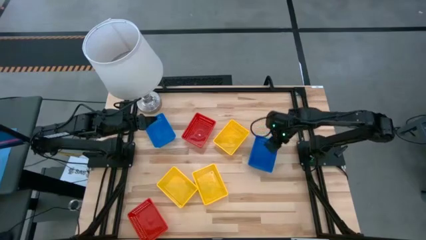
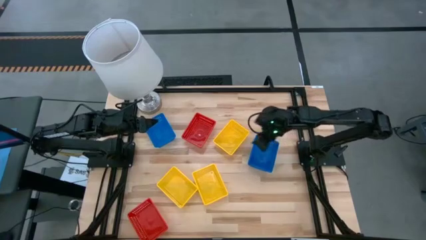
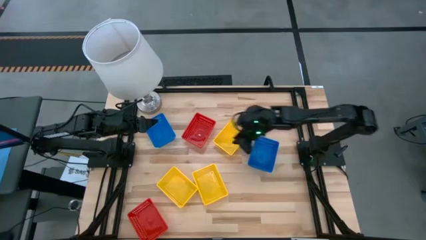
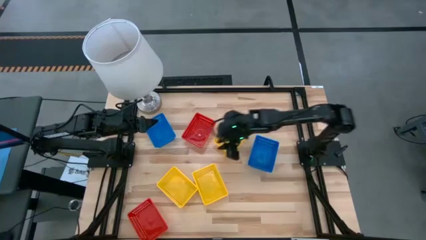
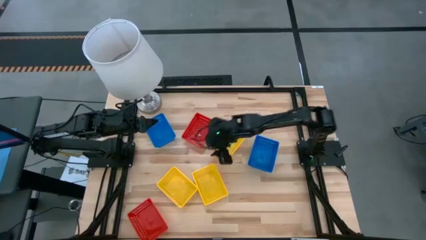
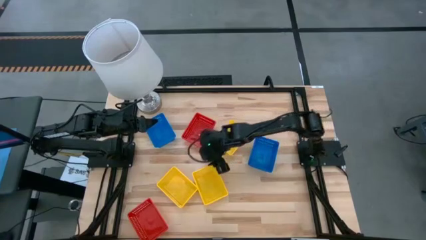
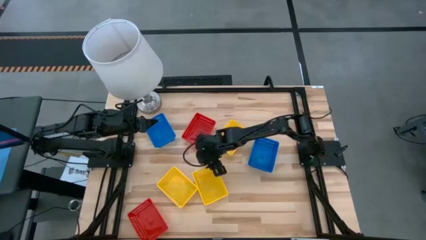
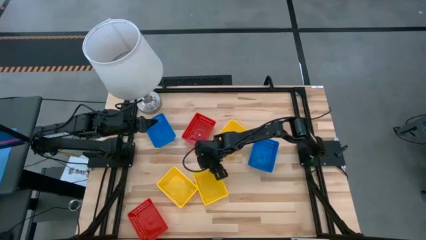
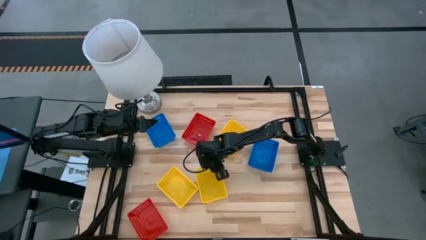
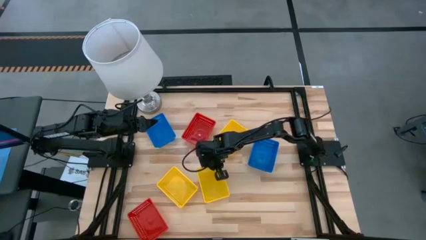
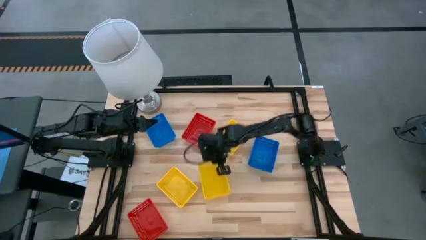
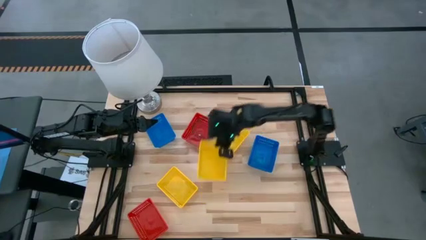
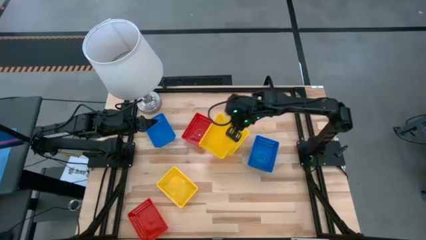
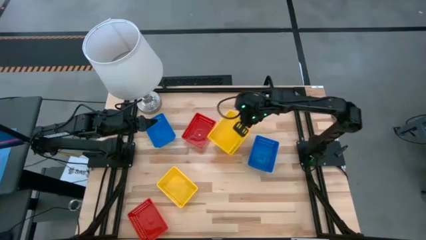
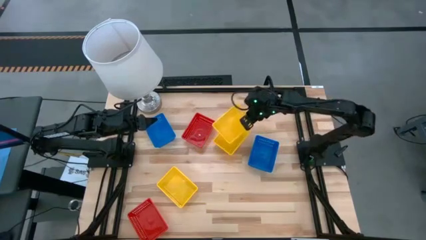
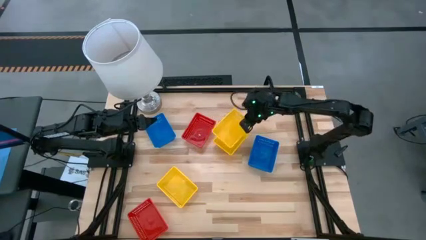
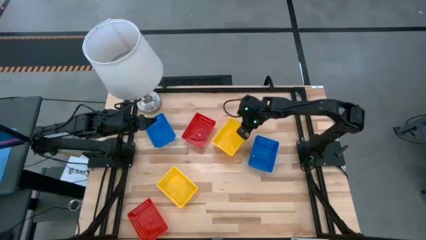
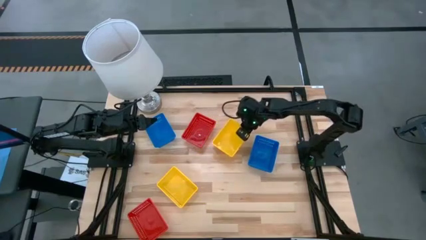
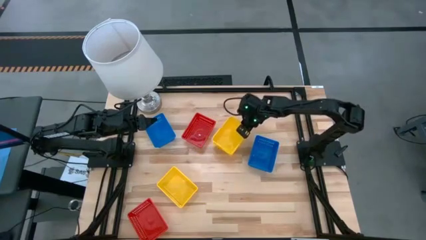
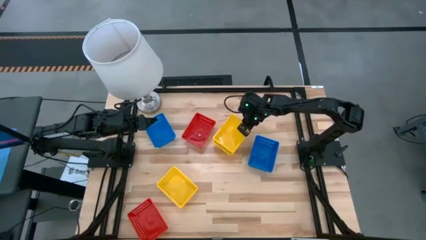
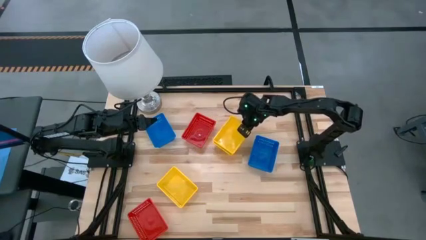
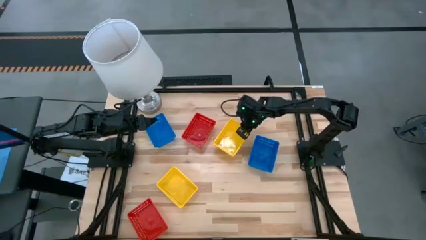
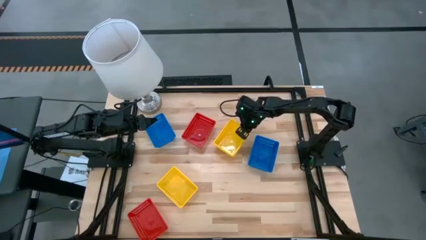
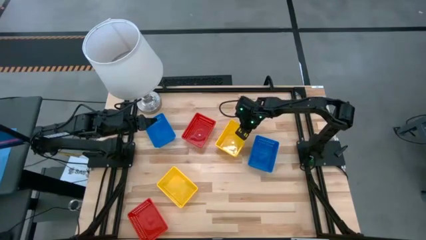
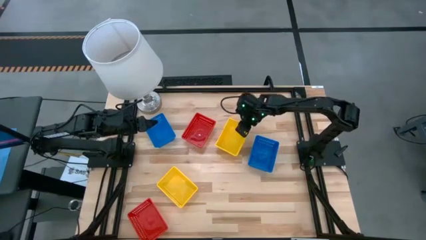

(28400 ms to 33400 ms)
Stack the bottom right yellow bin on the top yellow bin

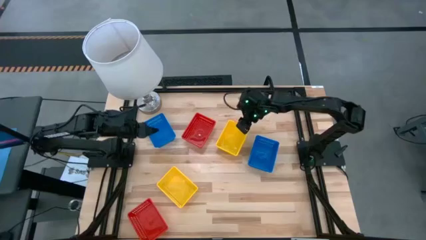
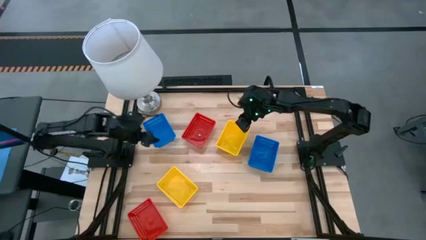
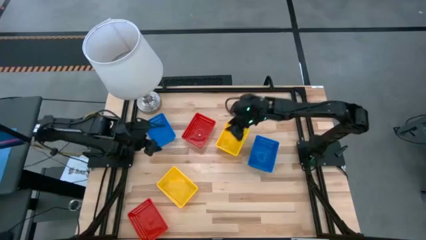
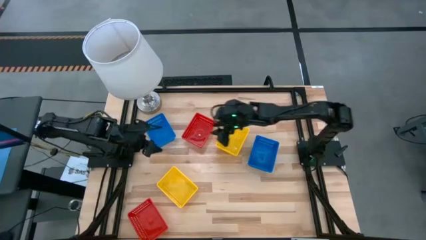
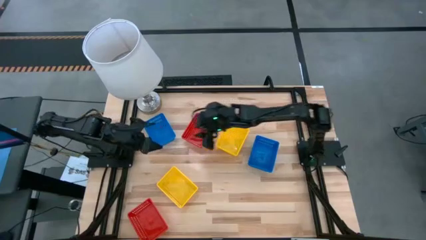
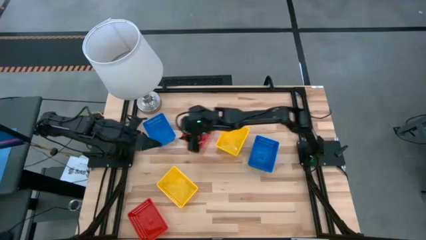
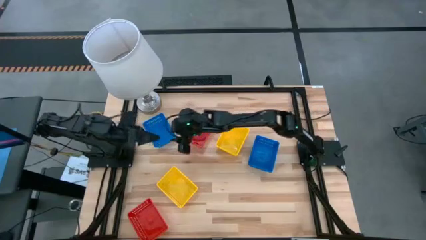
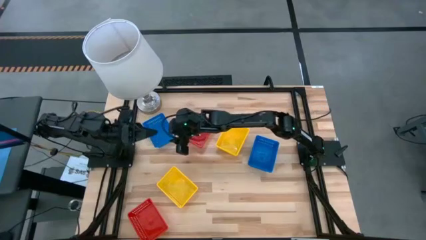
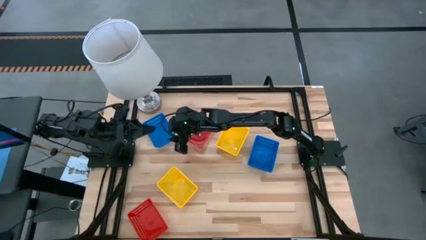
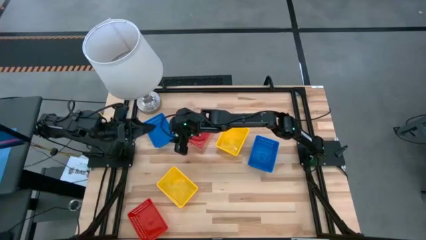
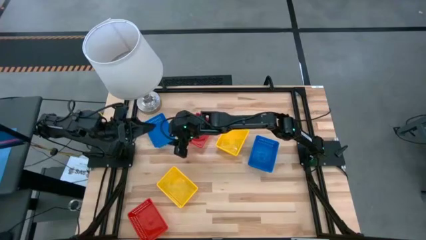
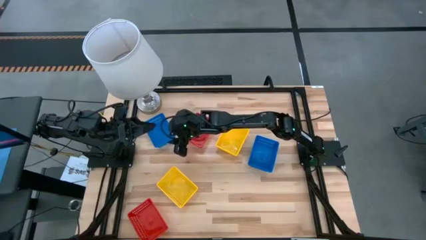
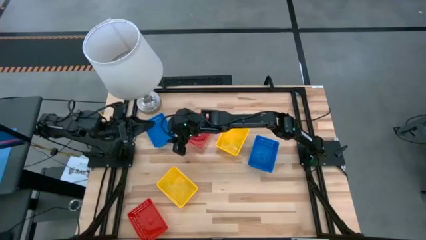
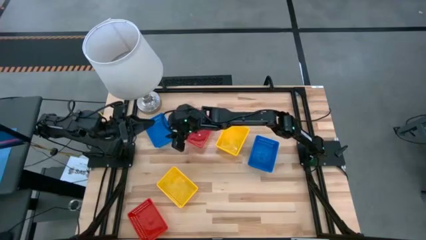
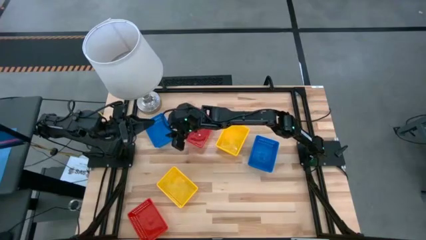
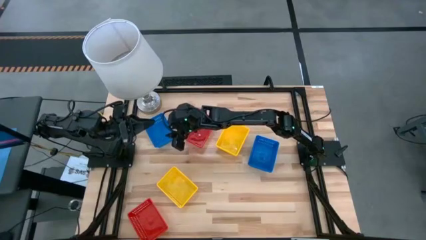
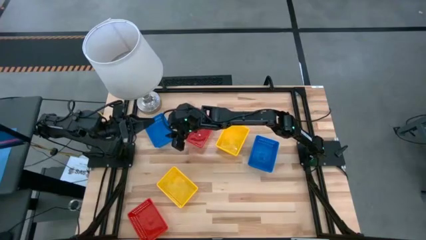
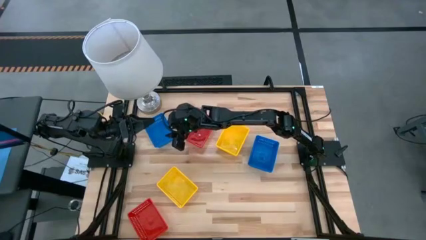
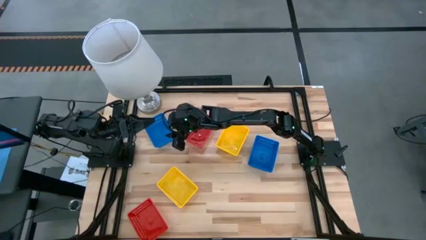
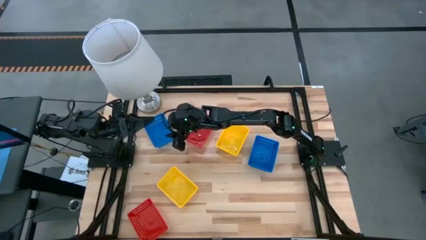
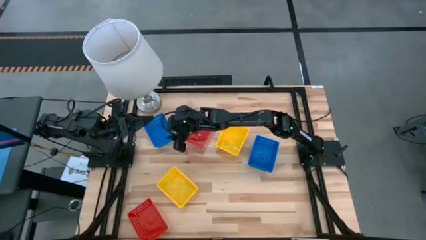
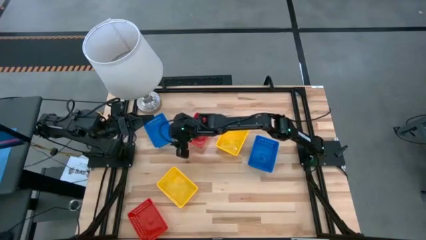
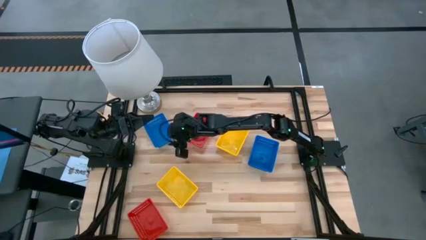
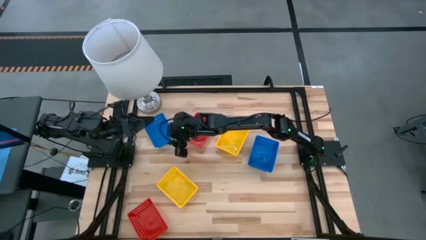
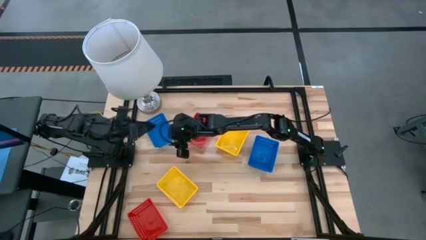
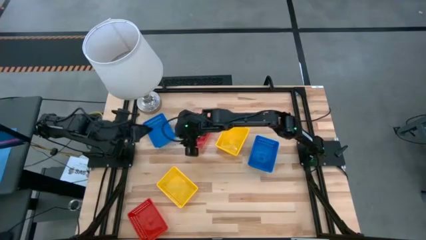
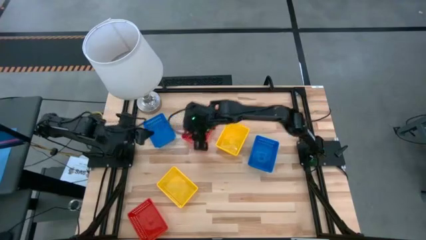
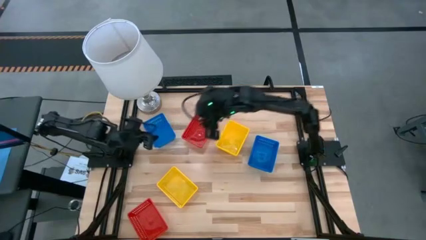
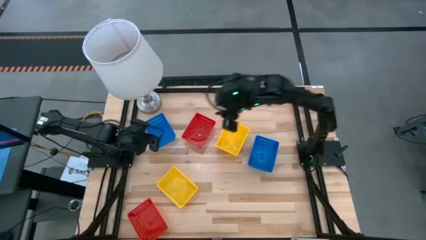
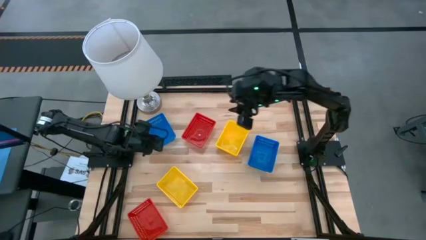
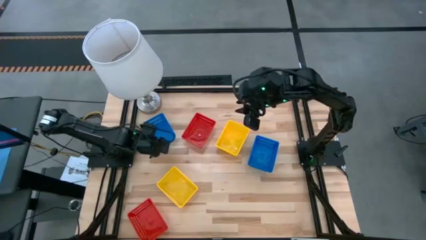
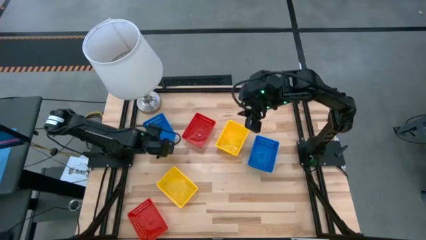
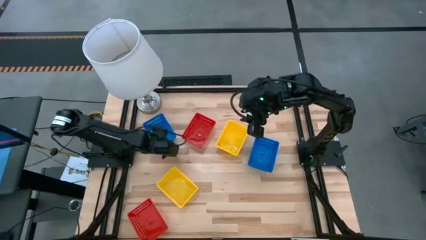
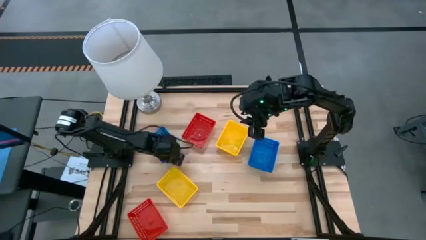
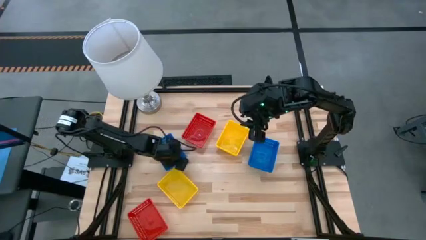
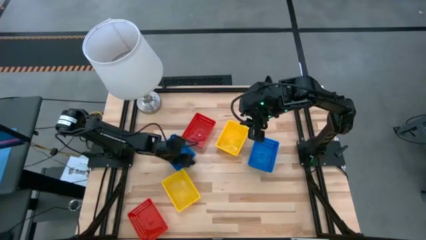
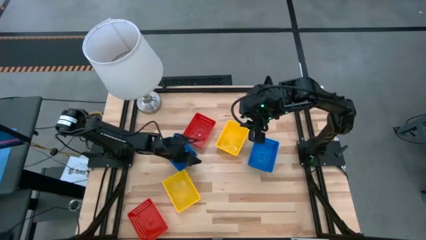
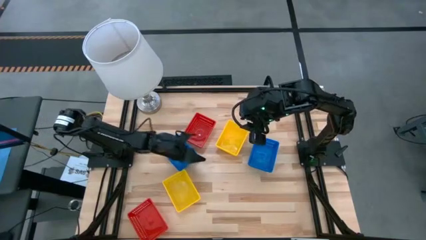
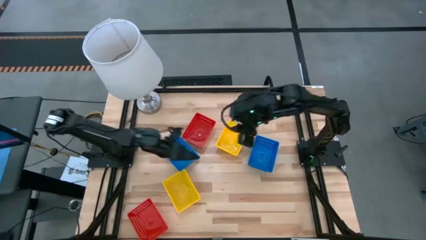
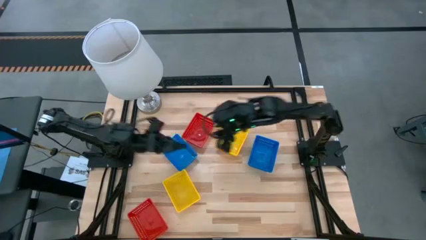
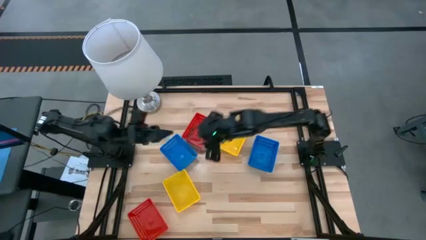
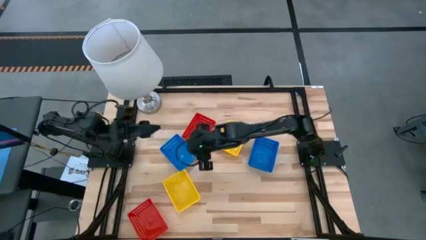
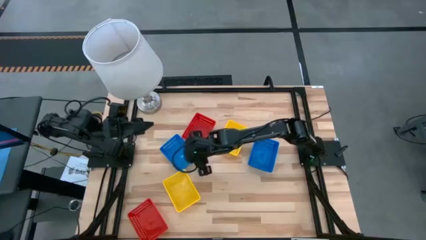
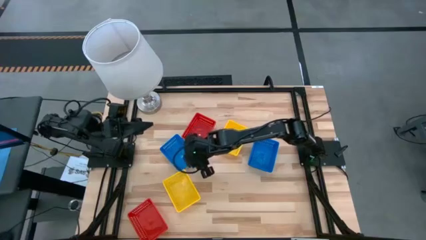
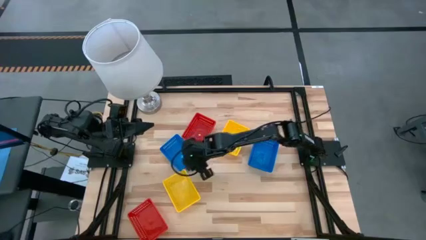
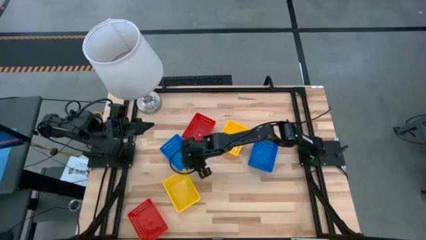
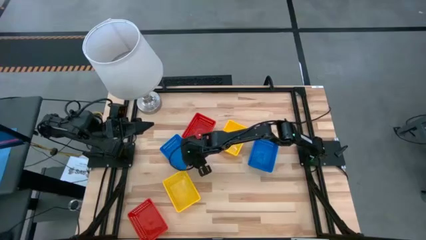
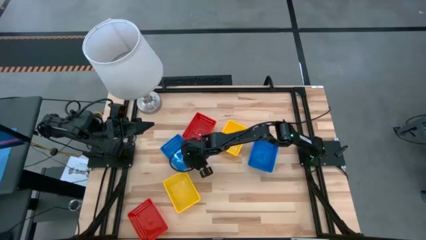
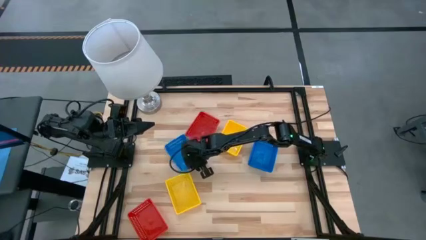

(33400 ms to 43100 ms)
Stack the blue bin on the blue bins

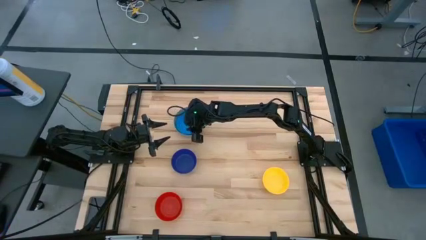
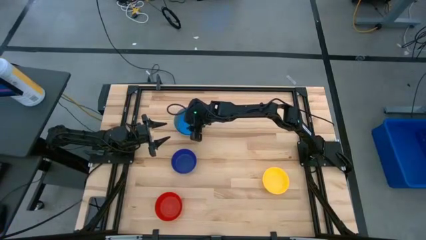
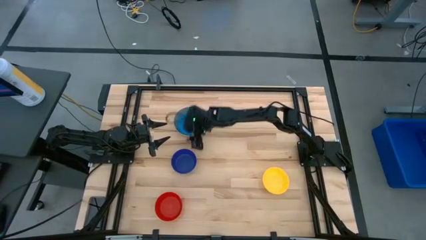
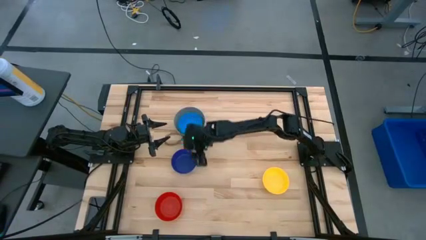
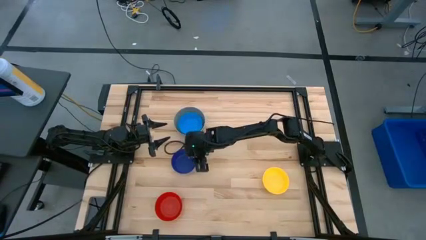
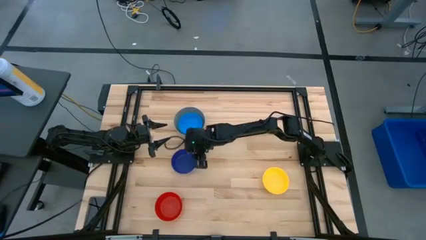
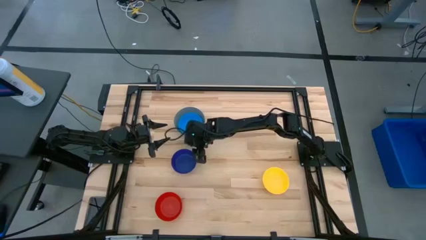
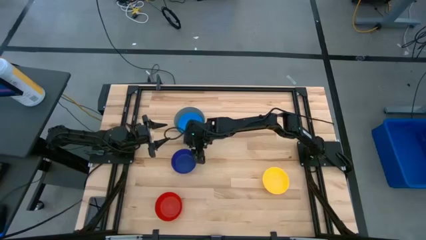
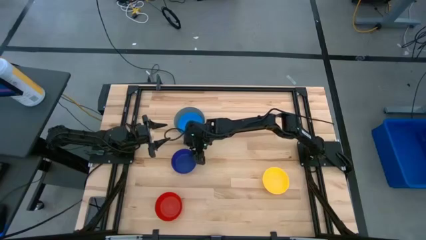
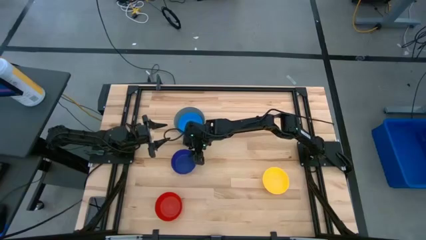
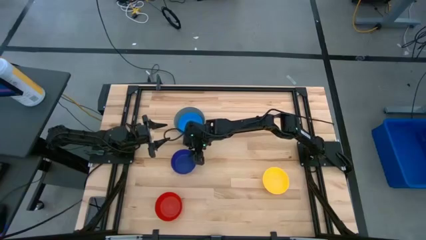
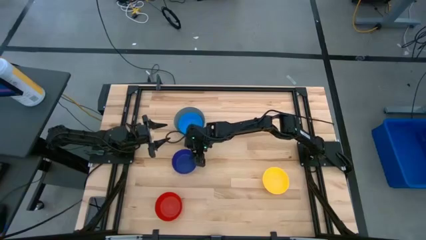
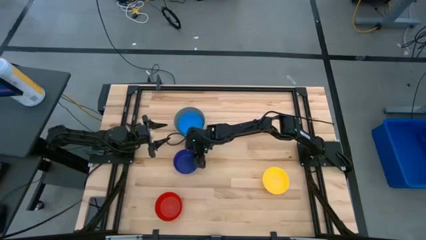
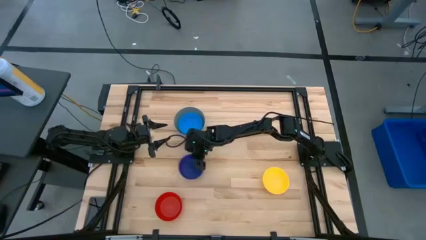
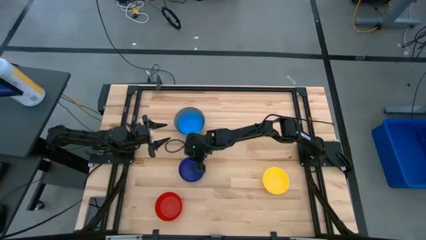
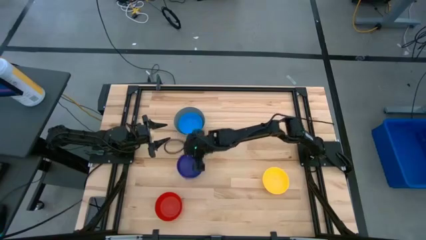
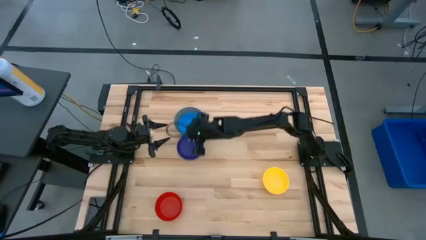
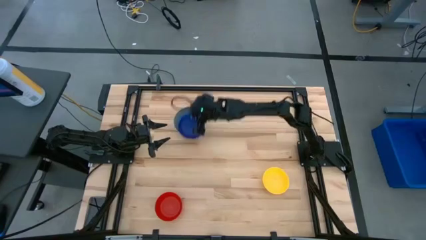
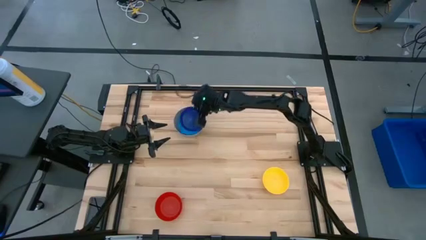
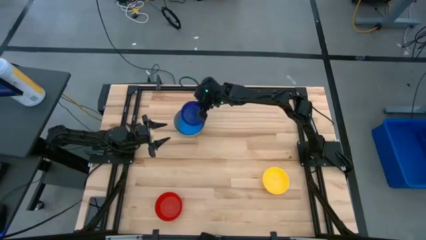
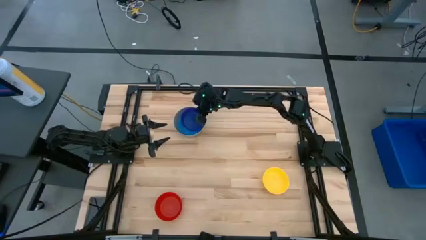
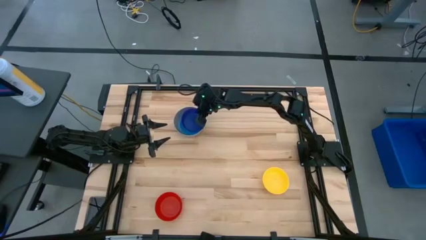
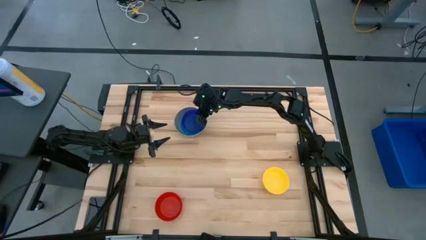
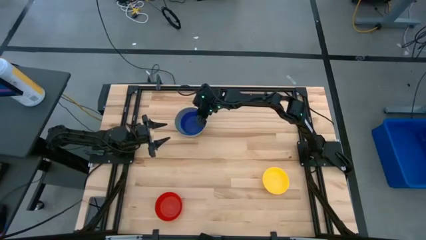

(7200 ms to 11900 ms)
Stack the blue bowl on the light blue bowl
